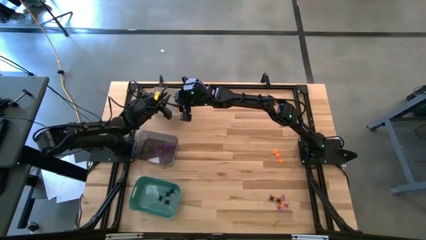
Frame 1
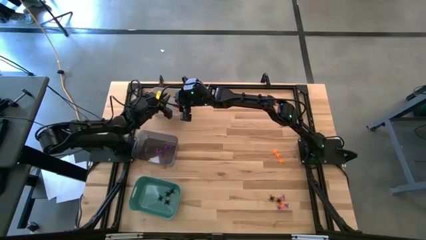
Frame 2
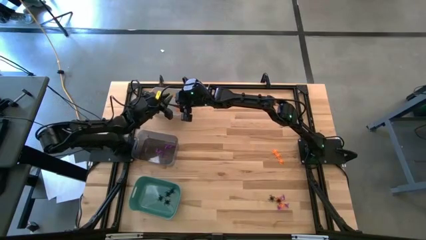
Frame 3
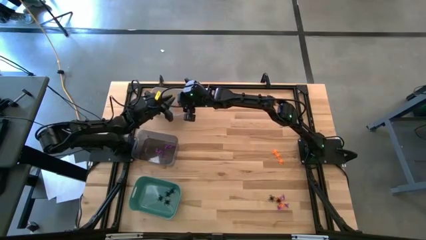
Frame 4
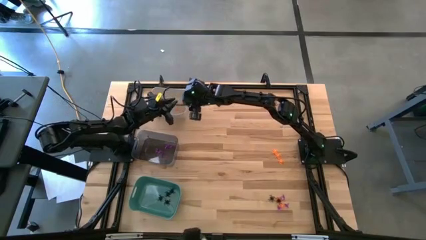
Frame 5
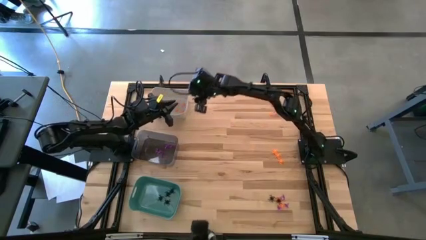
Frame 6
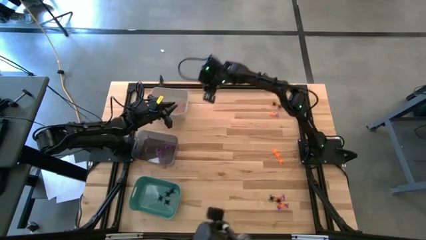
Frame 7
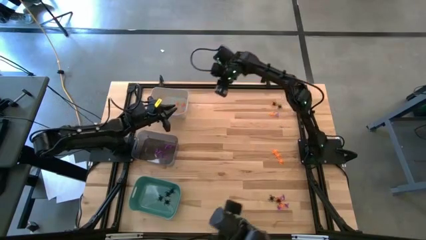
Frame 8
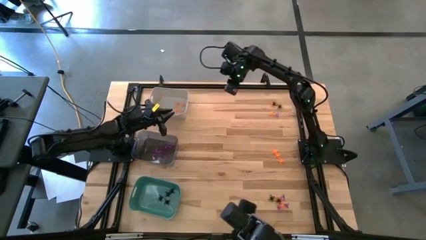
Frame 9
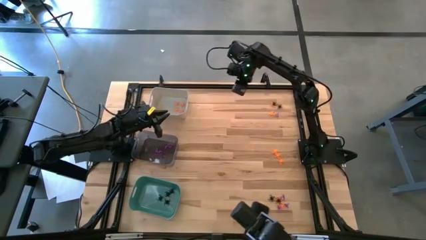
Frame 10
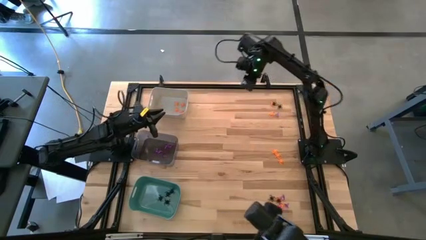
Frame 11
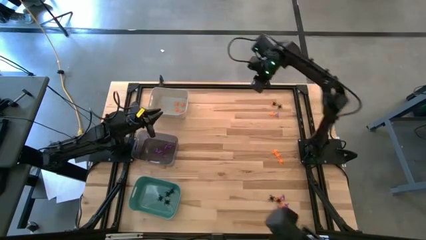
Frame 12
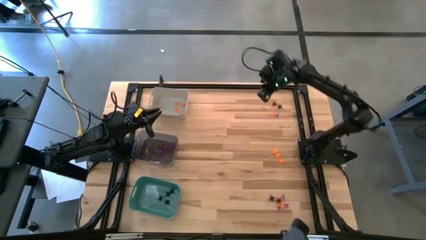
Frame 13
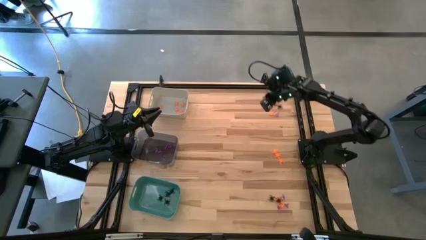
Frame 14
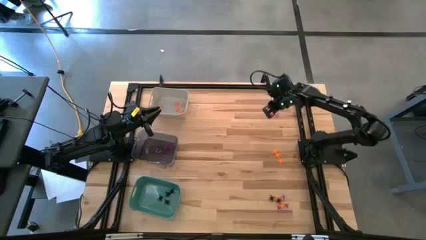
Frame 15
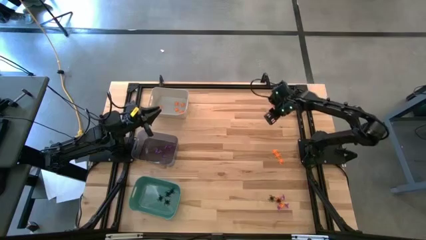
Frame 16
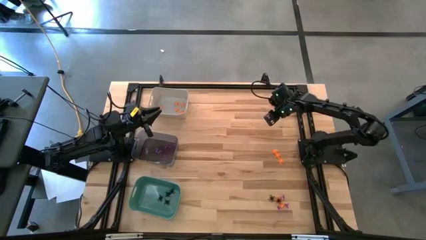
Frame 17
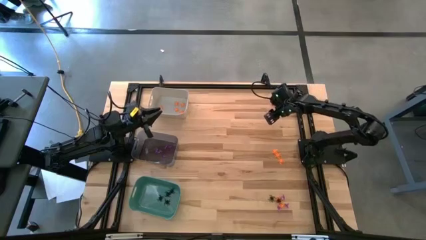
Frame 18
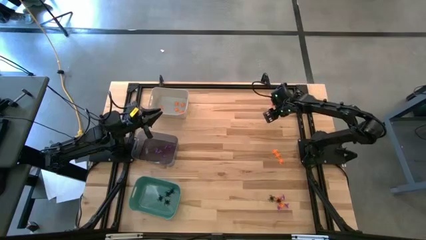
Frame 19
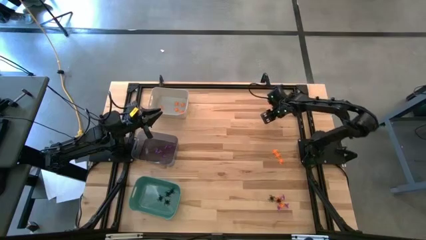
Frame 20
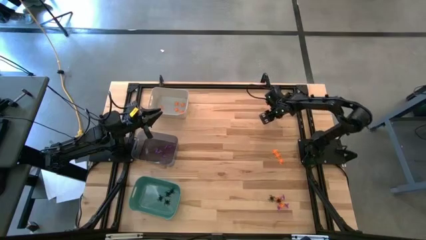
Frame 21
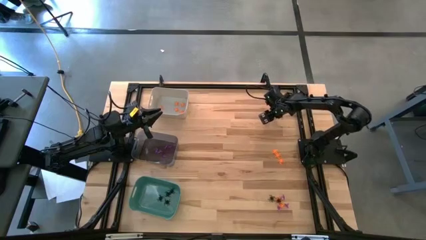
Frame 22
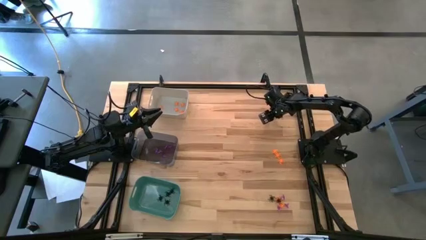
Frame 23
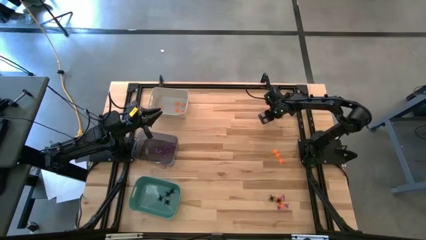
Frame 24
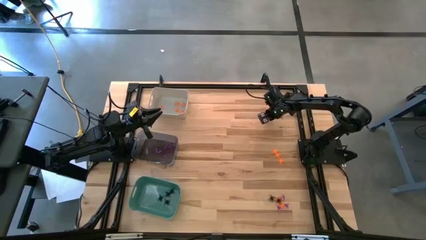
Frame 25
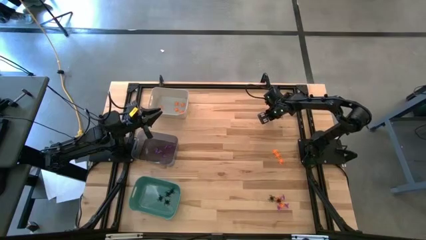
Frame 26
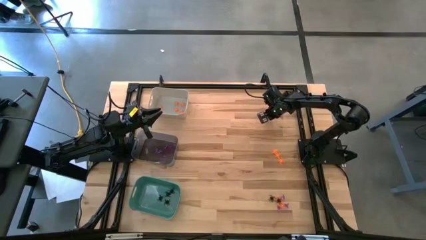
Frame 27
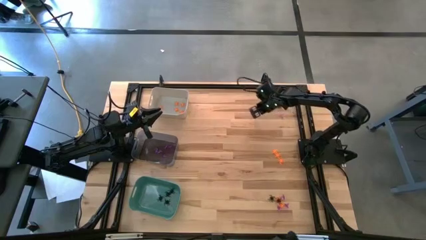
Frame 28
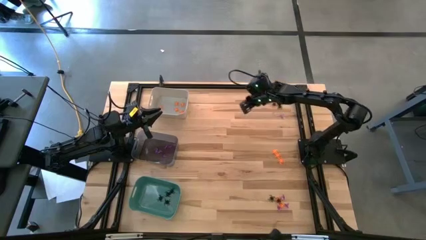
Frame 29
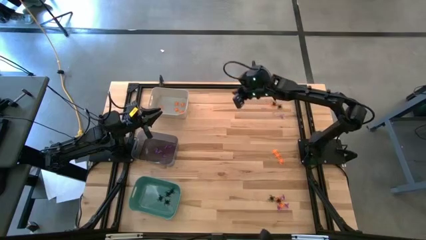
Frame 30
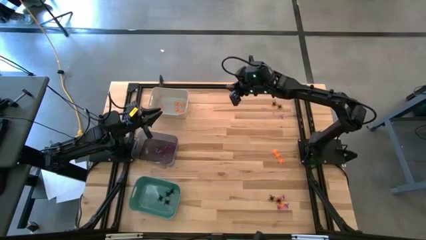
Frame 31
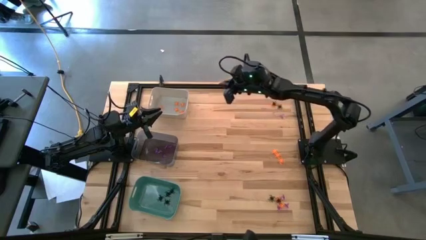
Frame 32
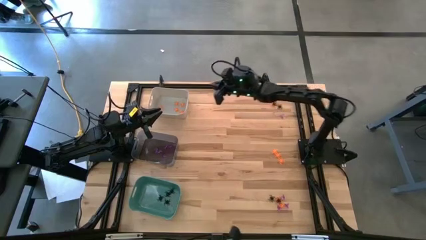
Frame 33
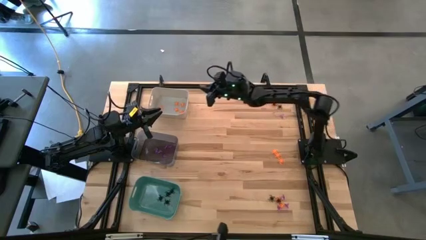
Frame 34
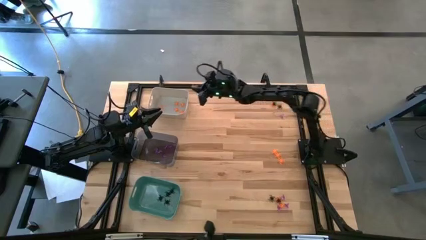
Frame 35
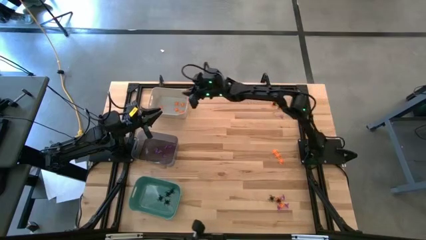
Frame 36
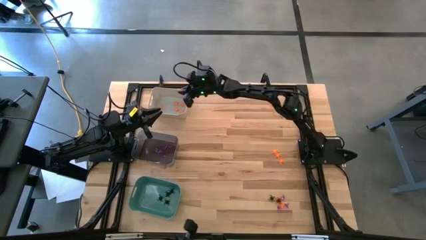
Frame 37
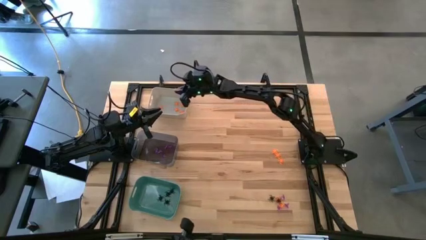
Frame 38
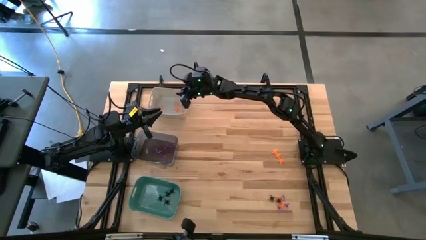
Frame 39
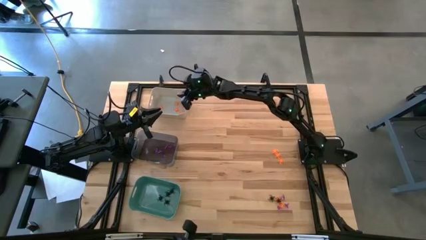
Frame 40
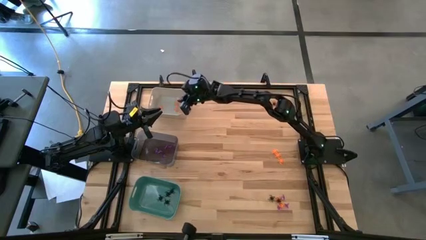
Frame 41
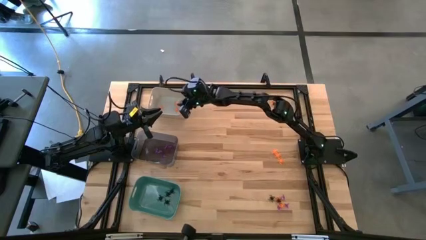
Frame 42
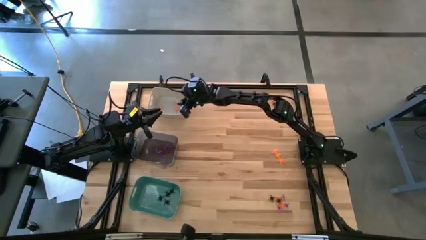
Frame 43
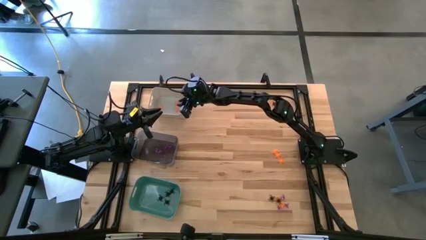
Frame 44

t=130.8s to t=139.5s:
Task: Sort Halloween decoration
Put the top right orange spider into the gray bin

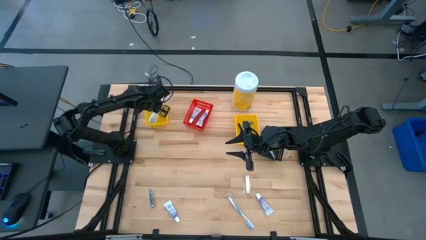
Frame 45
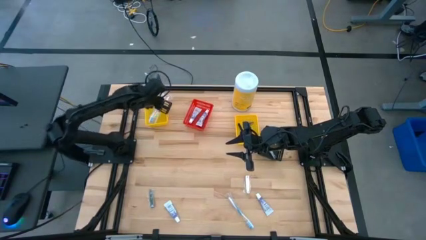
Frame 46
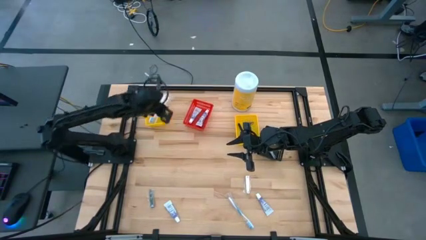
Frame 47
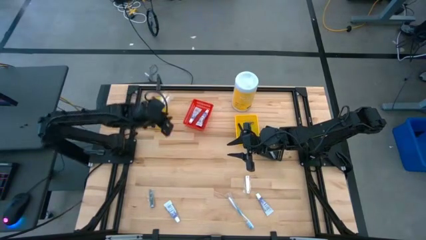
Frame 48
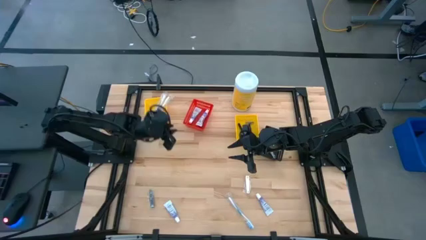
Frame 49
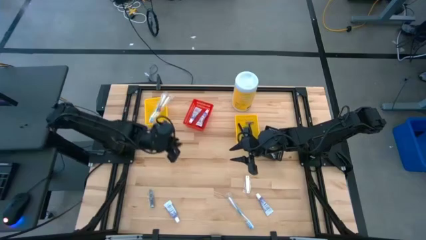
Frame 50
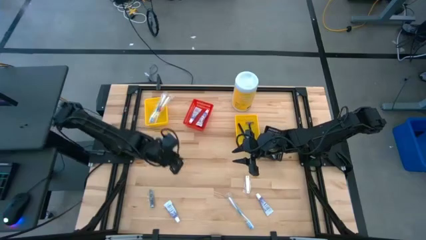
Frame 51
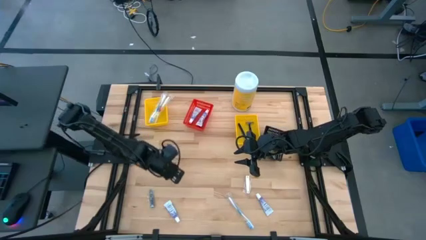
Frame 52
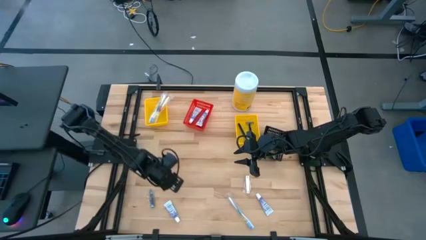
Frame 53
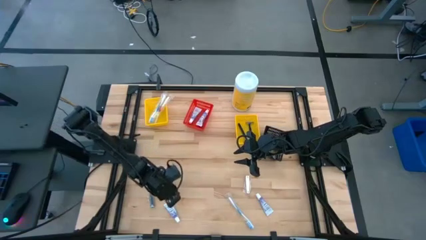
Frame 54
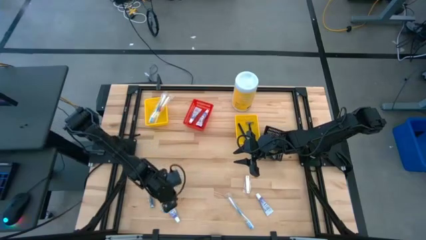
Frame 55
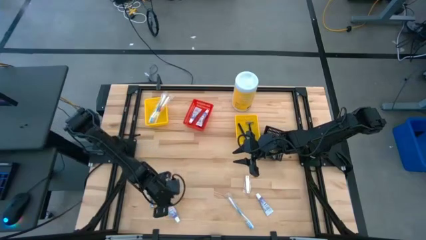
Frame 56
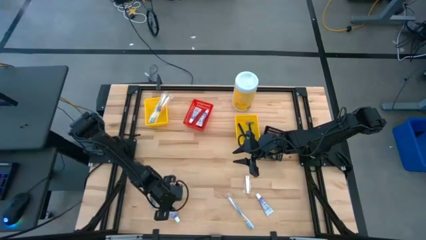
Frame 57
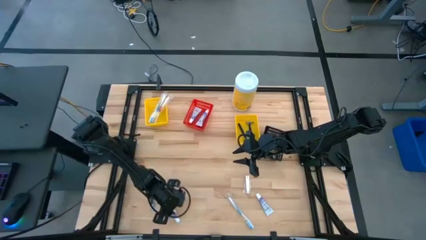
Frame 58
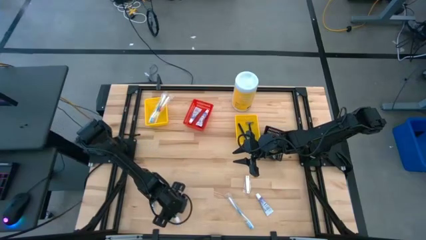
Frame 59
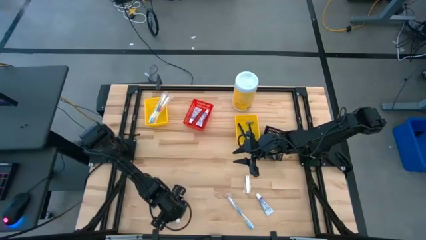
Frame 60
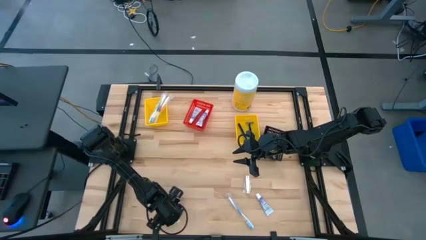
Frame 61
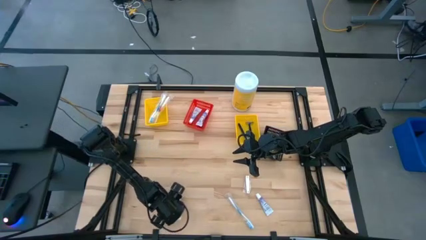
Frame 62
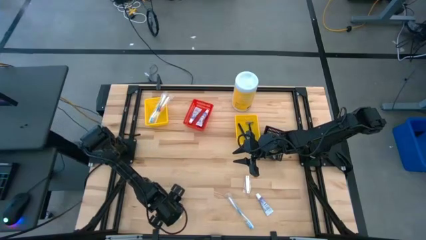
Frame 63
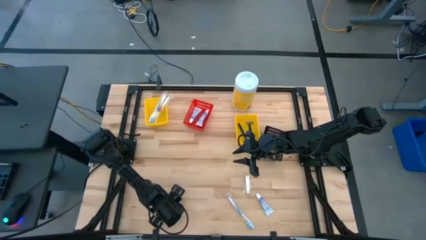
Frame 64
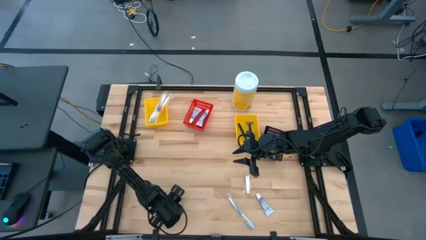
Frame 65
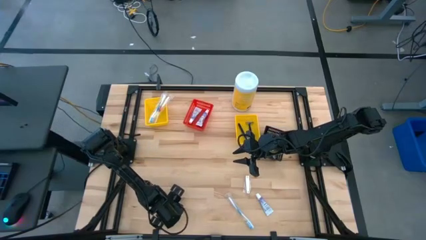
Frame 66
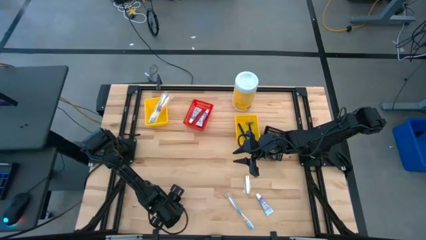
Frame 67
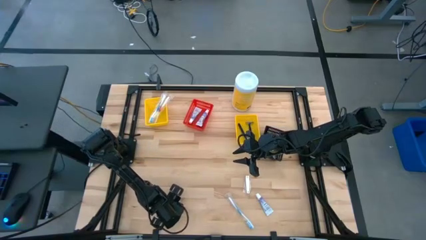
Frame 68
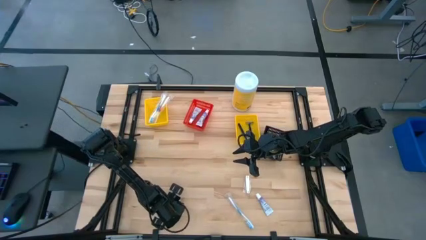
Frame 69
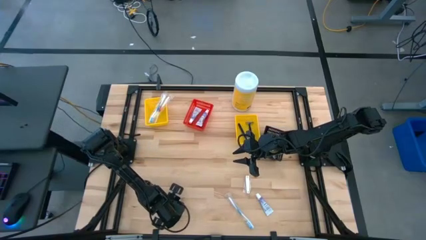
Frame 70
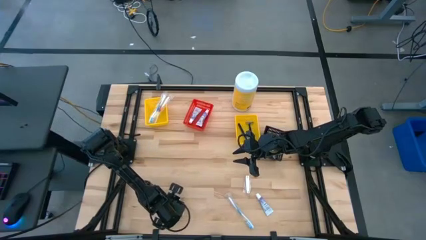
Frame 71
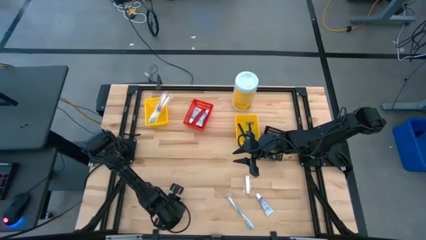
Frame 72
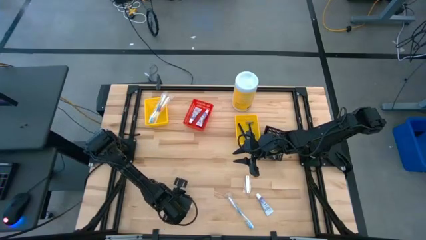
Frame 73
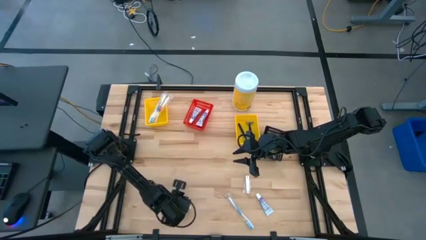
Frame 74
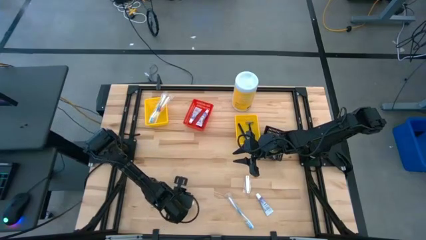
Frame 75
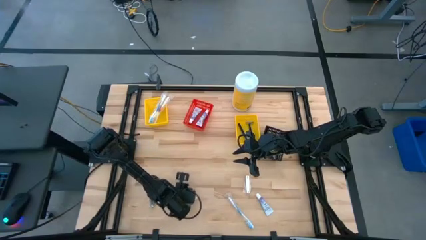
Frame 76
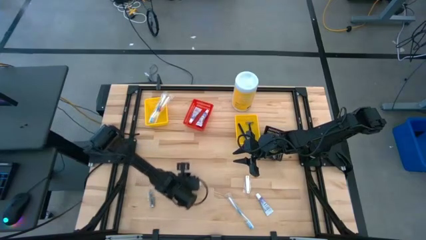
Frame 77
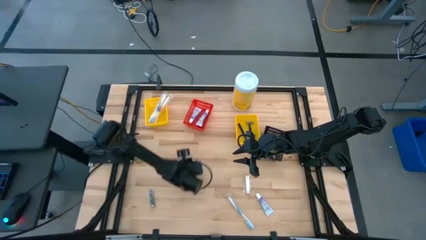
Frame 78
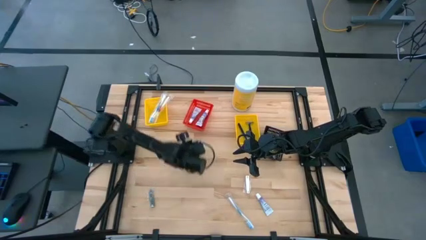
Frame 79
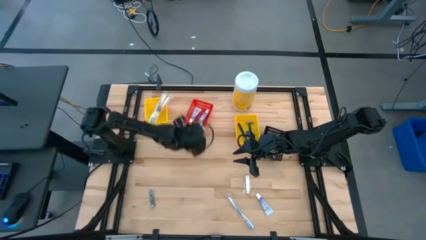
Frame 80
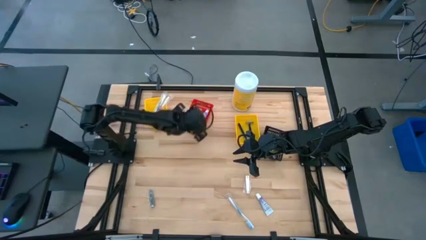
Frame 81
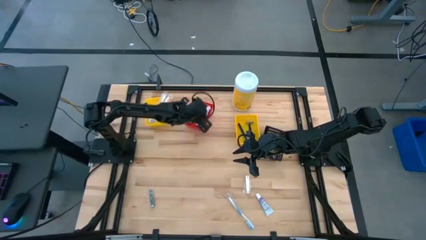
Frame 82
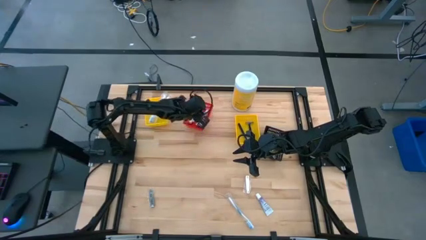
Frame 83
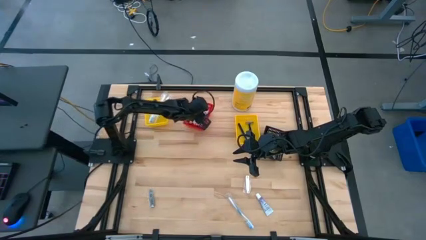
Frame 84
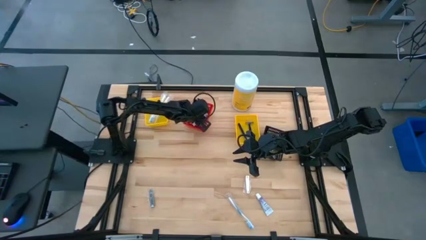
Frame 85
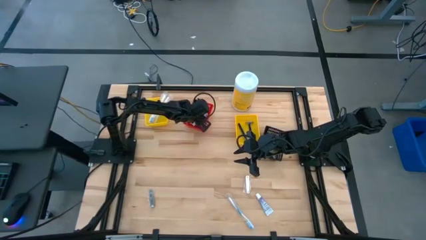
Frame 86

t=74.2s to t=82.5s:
Task: Pick & Place Travel size toiletries
Put the white toothpaste into the red basket
